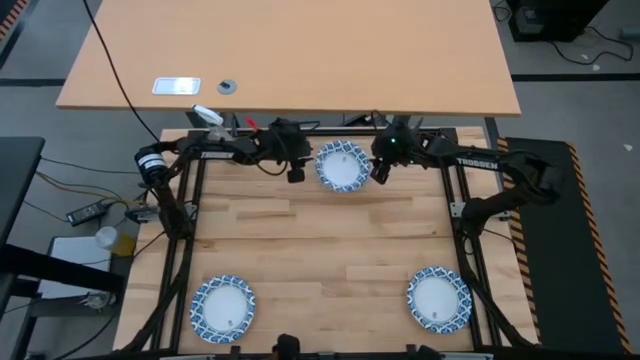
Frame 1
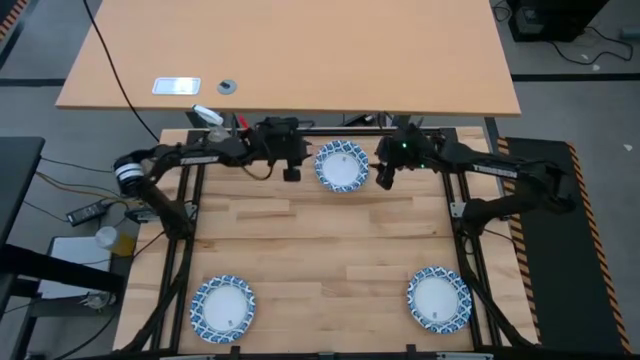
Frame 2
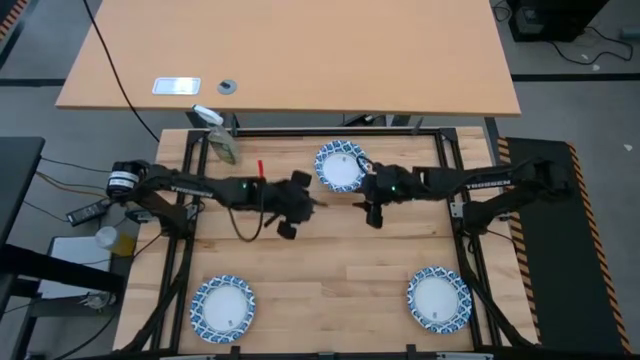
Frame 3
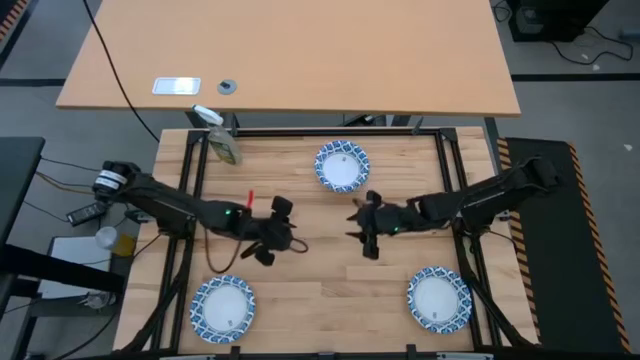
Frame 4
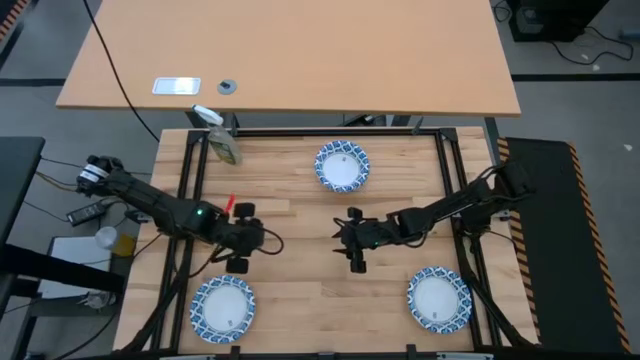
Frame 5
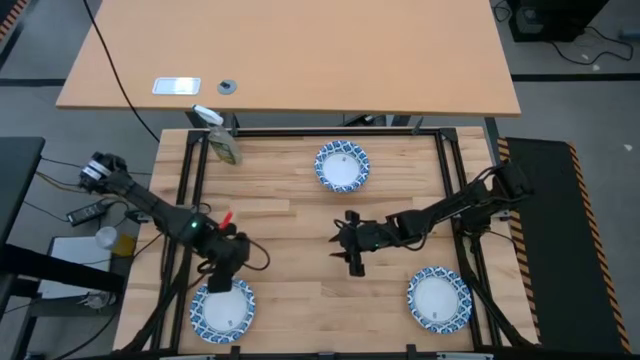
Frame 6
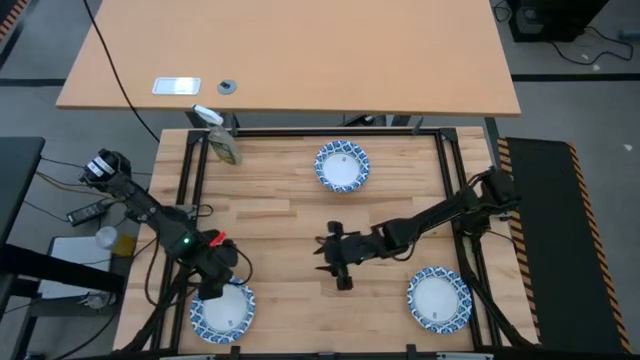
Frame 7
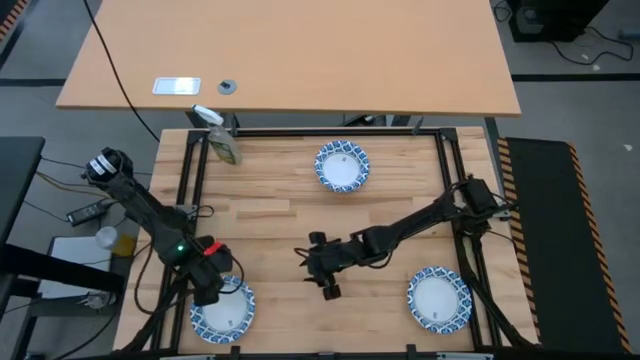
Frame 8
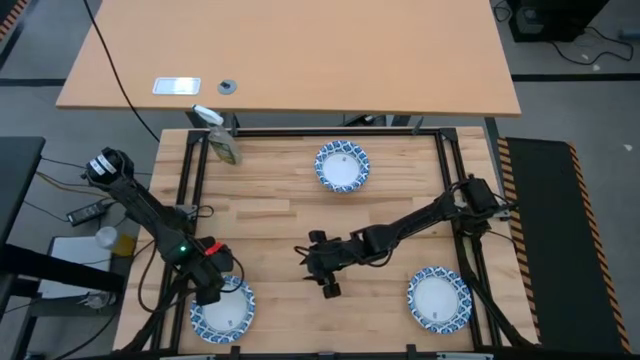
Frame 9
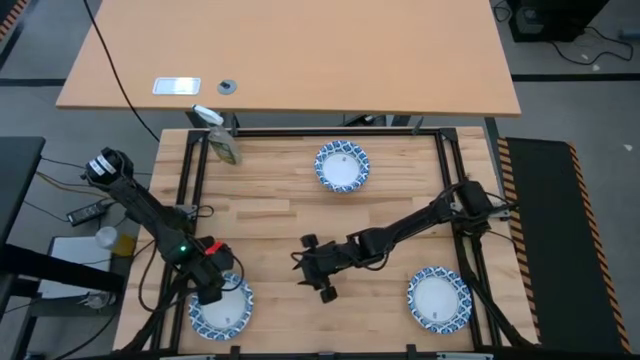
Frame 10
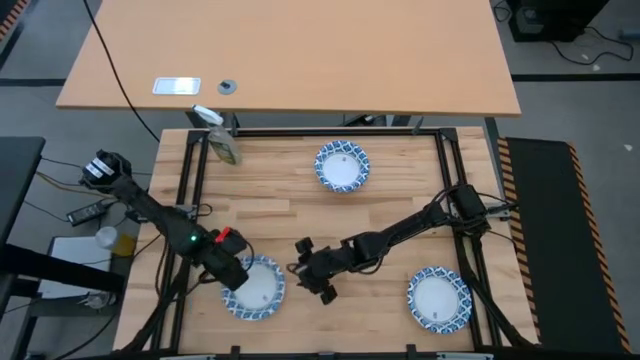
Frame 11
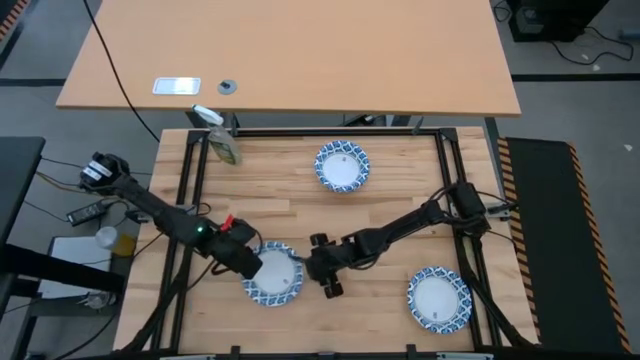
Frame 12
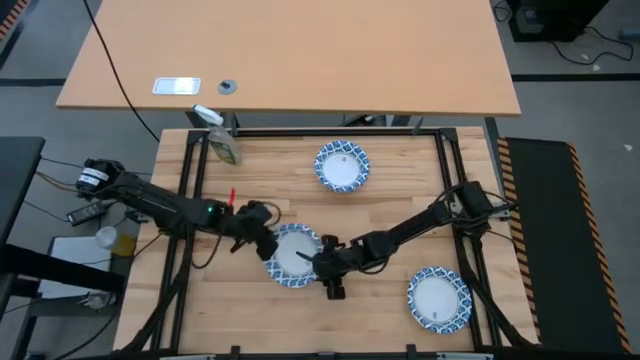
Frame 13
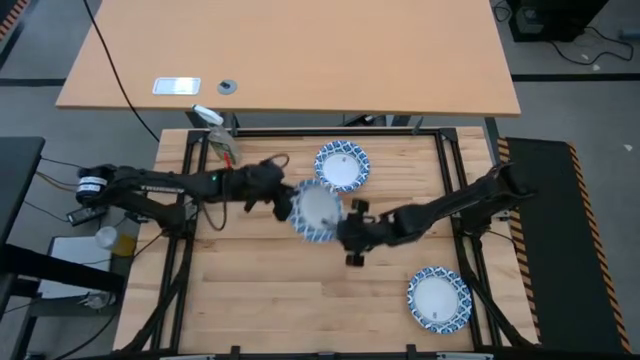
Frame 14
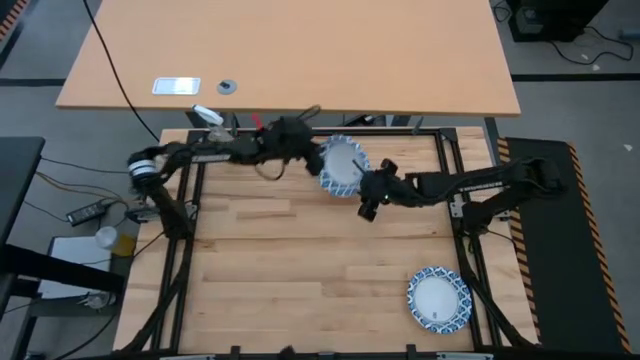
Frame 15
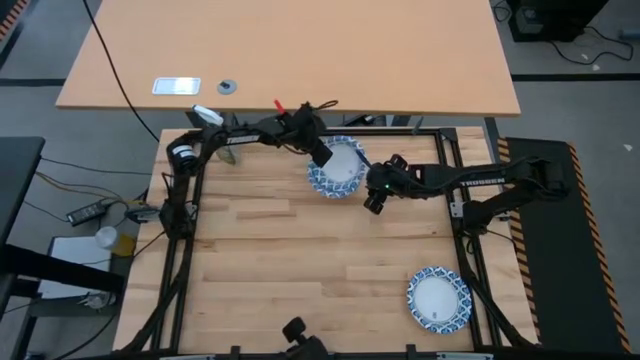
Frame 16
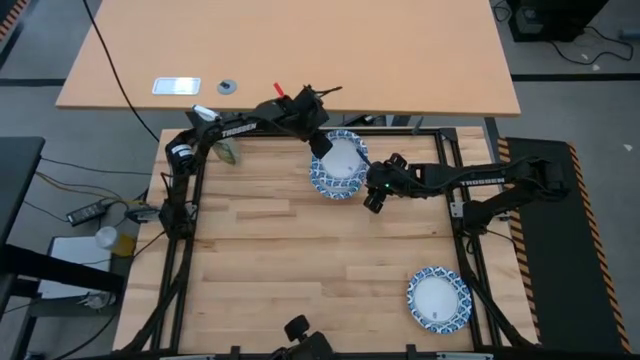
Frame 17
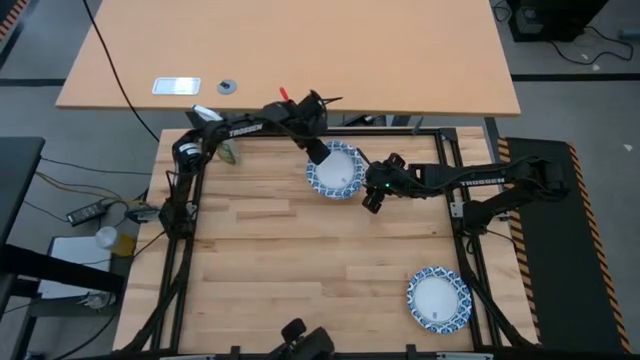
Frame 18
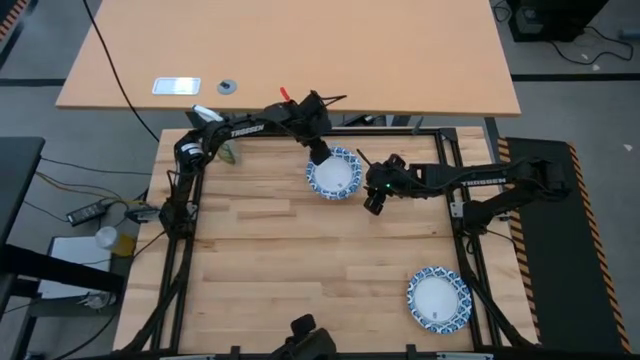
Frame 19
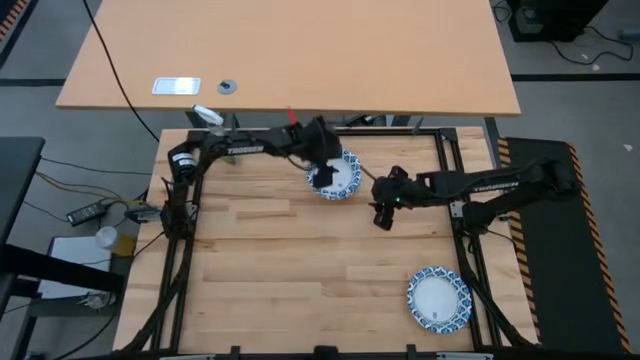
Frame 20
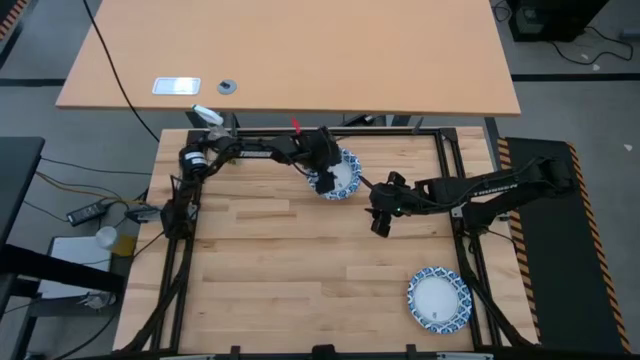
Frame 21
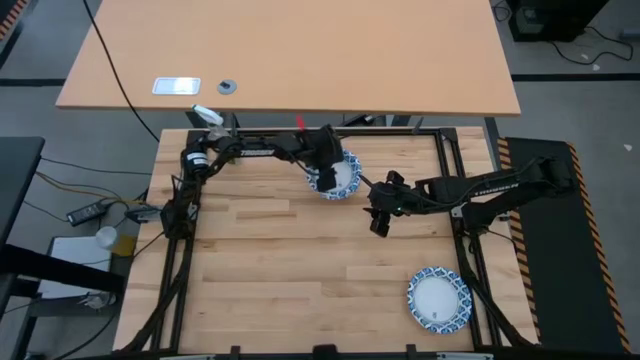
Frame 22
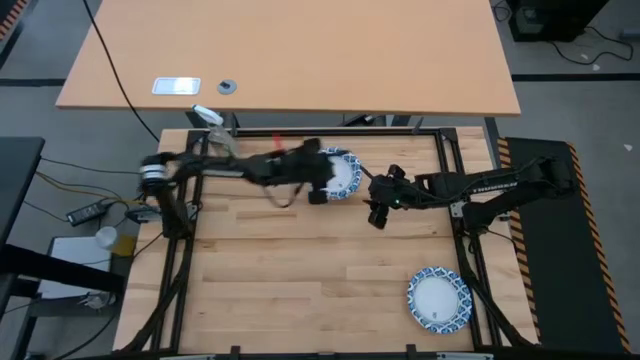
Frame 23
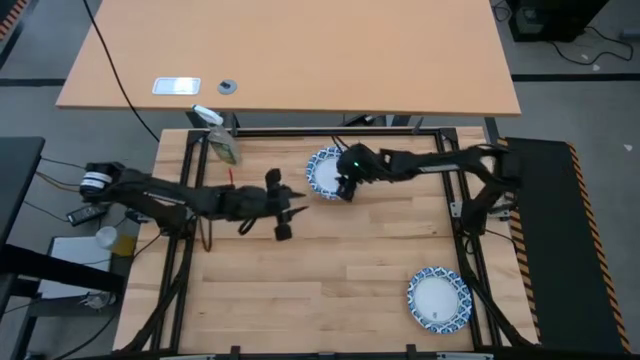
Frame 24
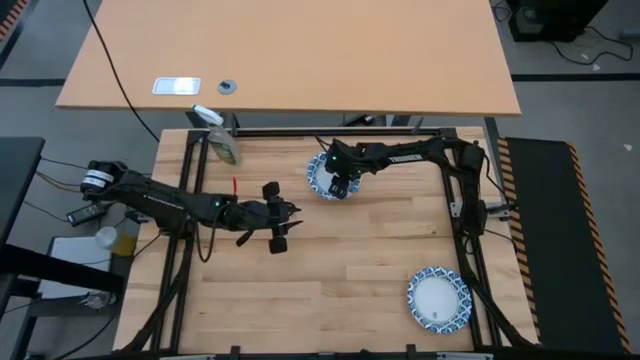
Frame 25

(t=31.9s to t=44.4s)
Stack the blue white patterned bowl on top of the other blue white patterned bowls
